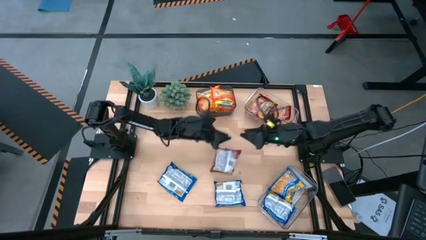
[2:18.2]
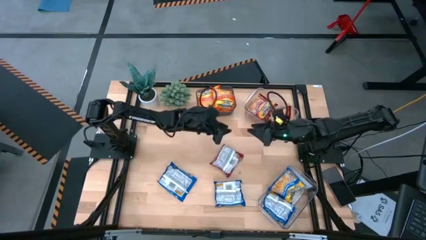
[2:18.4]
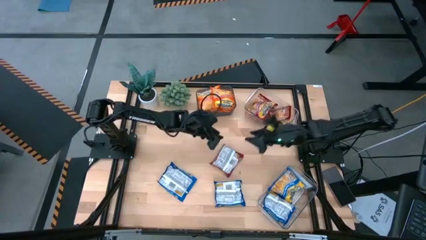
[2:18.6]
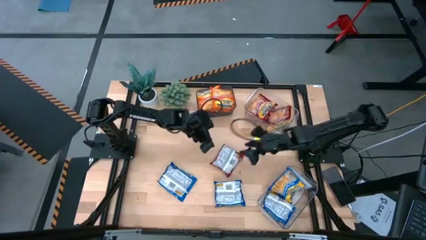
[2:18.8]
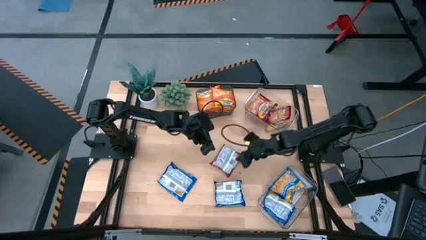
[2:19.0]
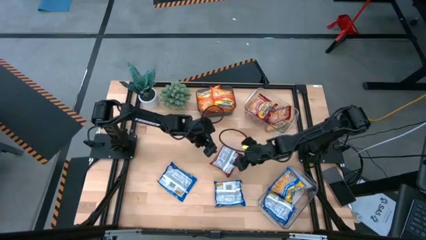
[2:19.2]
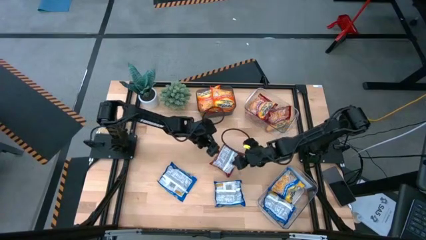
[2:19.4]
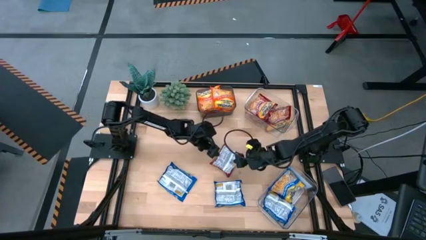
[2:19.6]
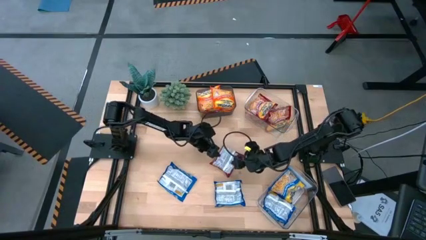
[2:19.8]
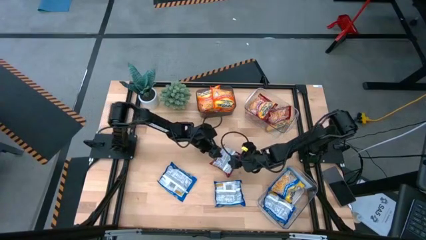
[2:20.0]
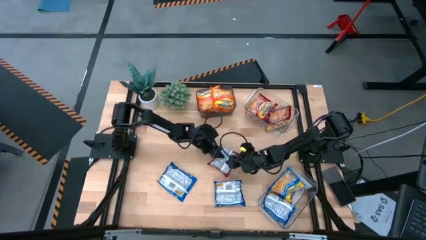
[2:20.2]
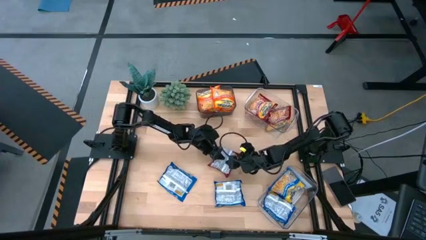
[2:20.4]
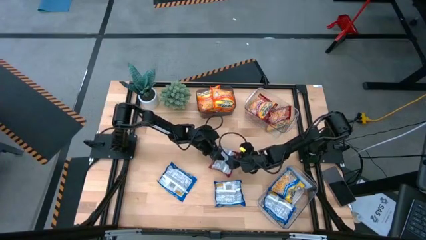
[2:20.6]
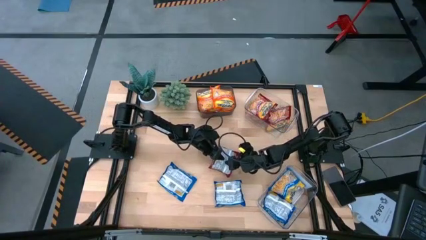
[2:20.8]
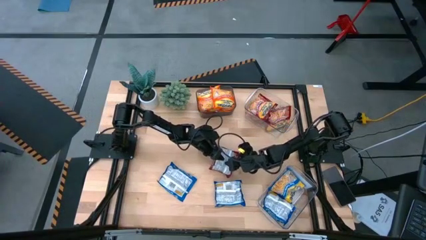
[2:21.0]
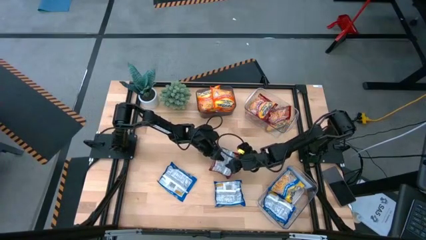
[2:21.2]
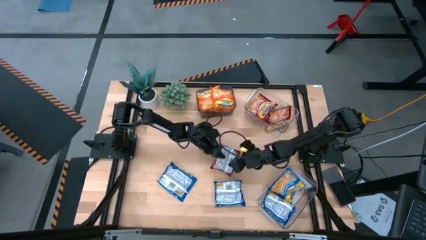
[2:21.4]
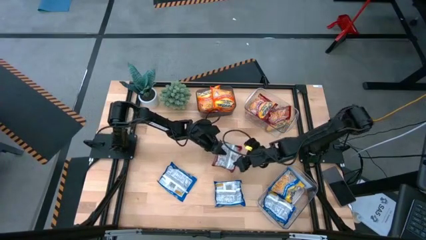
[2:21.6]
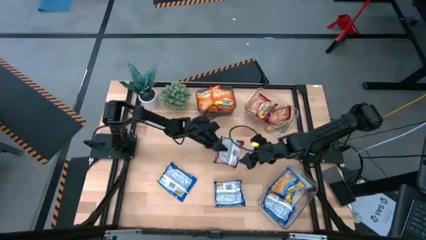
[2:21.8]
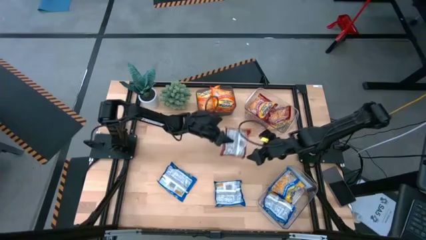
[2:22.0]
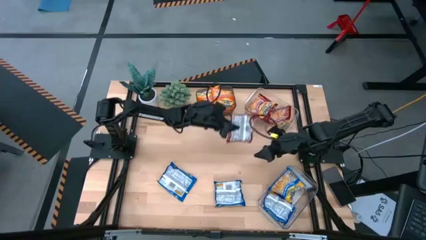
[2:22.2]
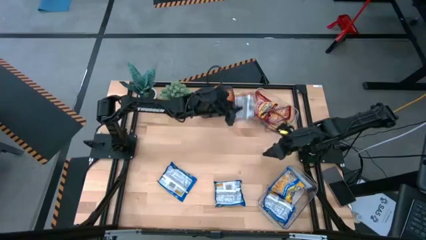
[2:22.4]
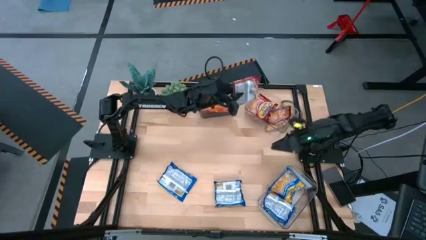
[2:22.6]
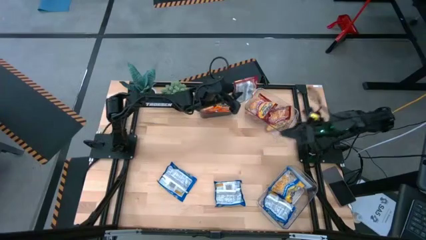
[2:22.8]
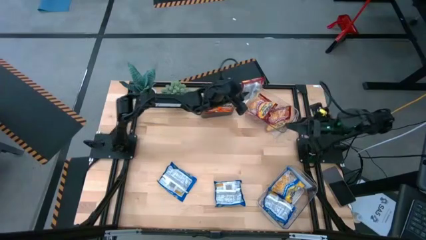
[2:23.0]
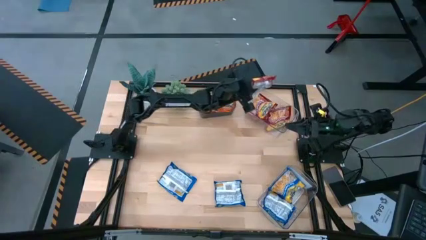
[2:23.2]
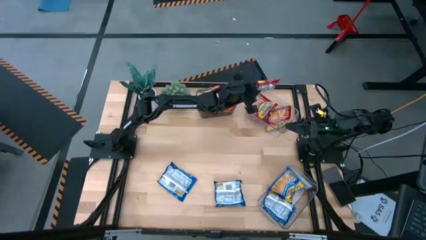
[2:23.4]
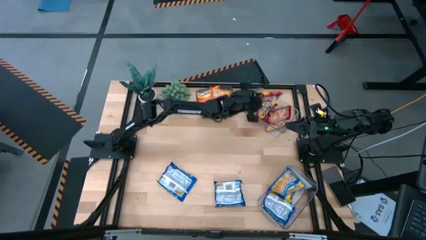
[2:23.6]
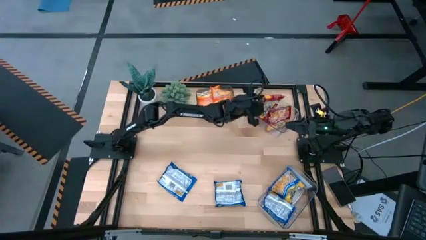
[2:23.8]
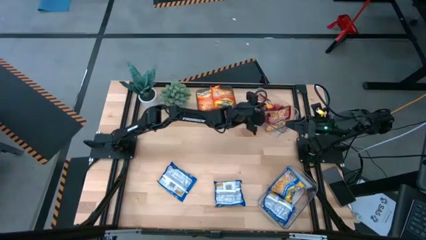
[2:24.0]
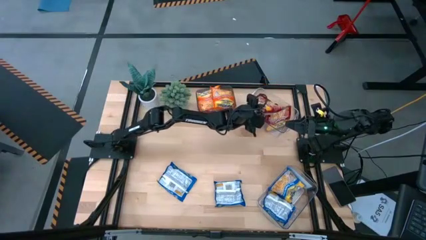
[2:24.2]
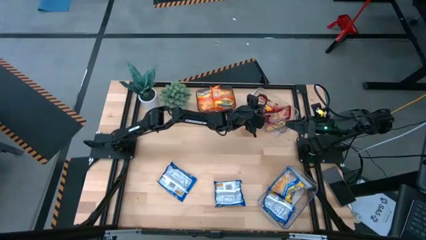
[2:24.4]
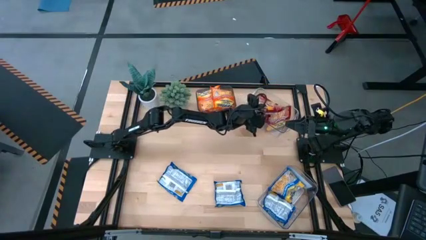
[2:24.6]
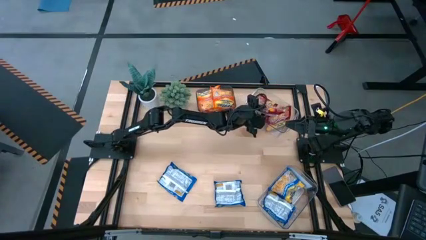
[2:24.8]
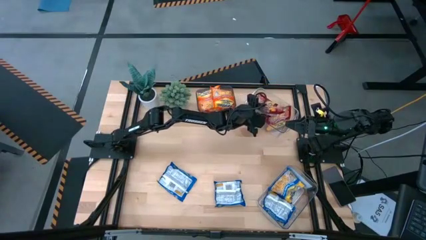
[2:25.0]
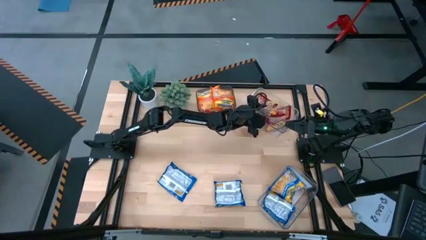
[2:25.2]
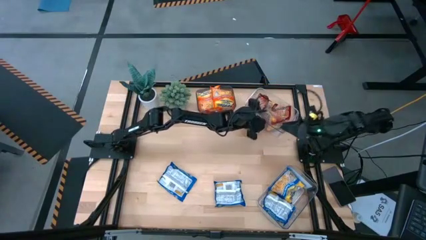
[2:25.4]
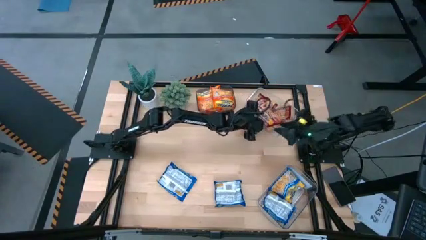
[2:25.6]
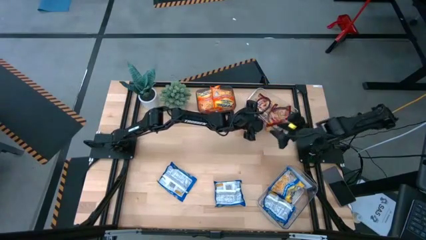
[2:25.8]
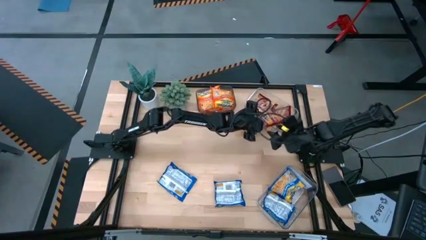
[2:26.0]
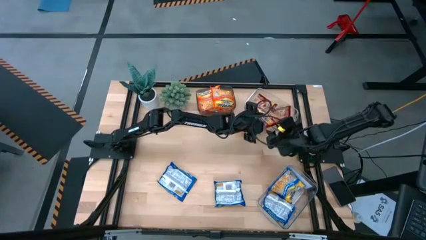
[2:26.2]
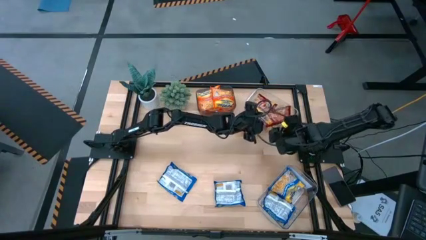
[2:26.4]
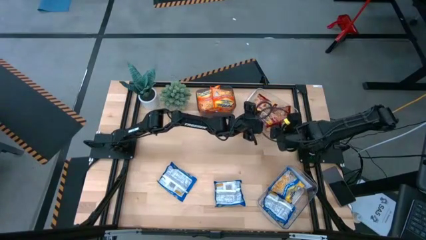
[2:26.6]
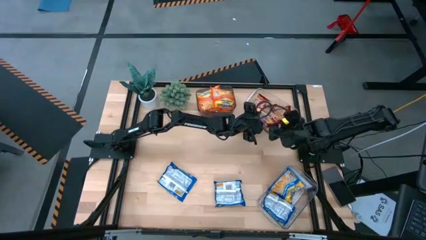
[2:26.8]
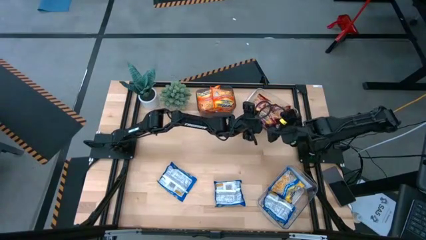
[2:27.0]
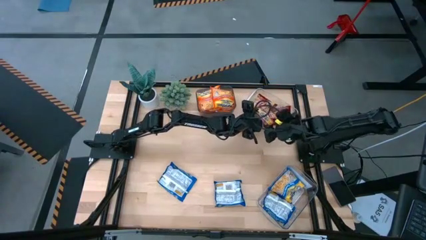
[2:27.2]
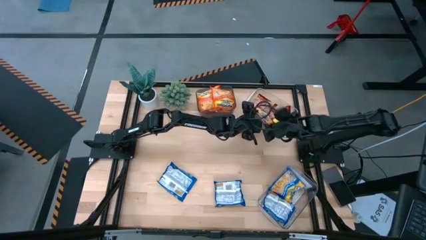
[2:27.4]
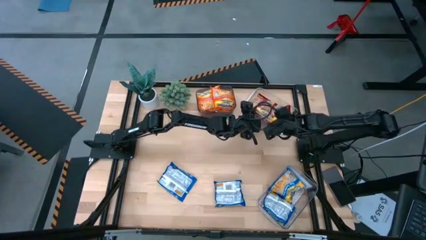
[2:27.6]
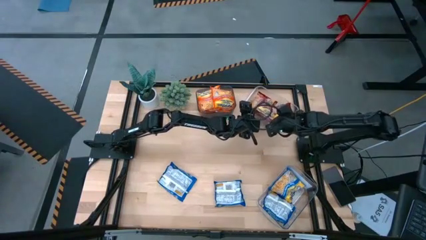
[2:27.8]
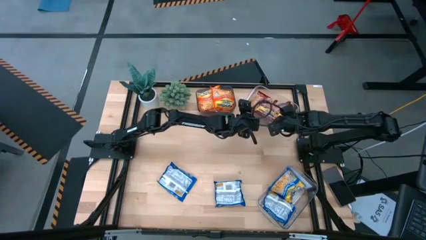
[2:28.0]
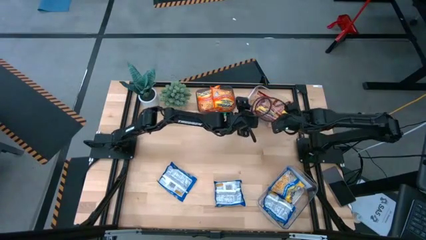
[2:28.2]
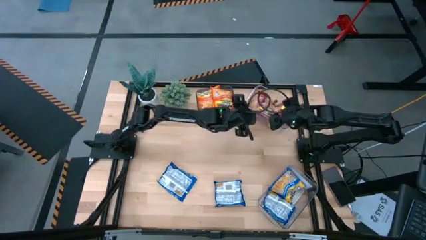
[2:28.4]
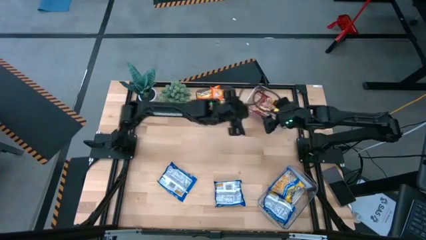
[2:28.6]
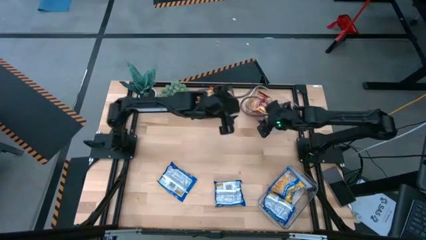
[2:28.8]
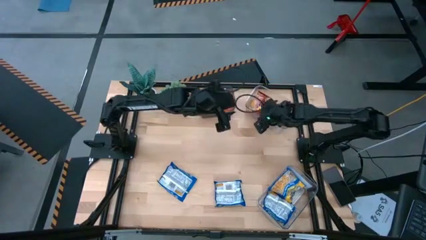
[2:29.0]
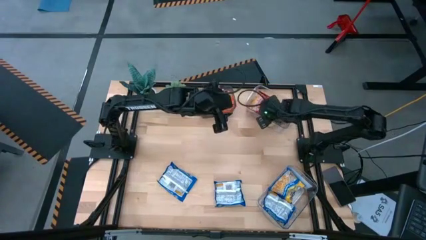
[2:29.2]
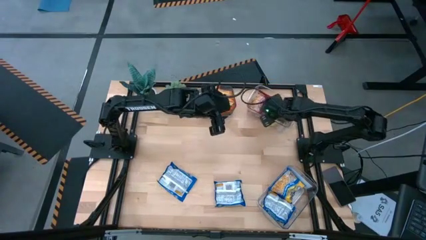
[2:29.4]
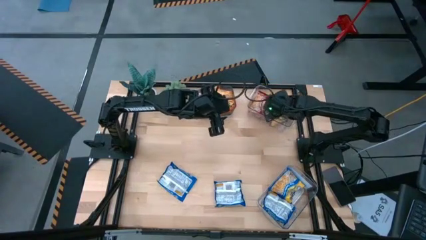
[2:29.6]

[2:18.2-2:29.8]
Task: Sort Maruchan noodles
Put the red noodle pack into the top transparent bin

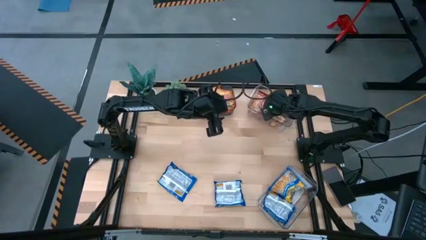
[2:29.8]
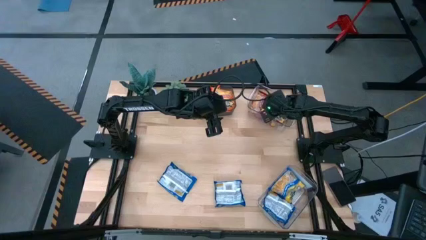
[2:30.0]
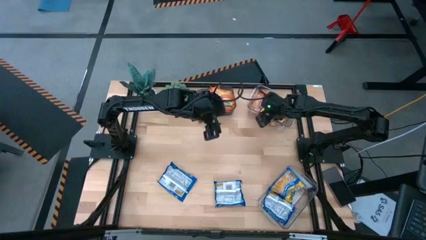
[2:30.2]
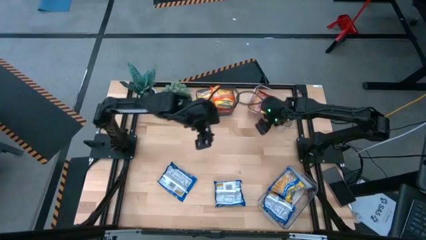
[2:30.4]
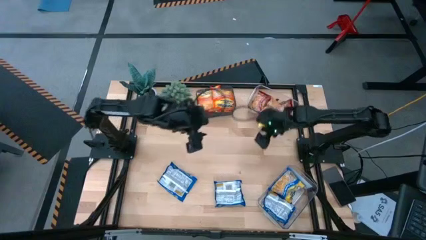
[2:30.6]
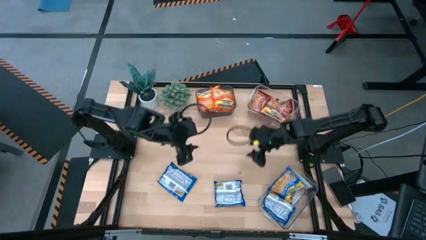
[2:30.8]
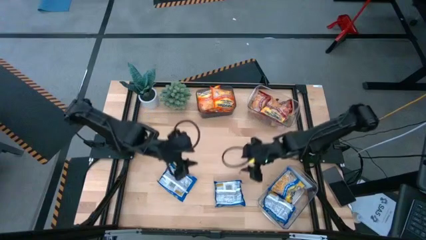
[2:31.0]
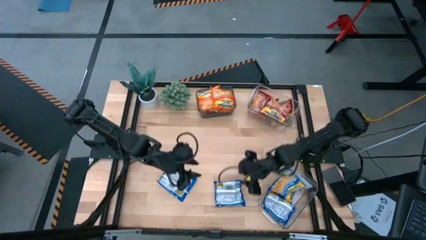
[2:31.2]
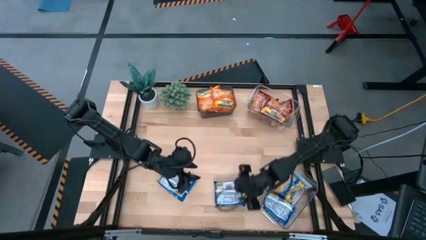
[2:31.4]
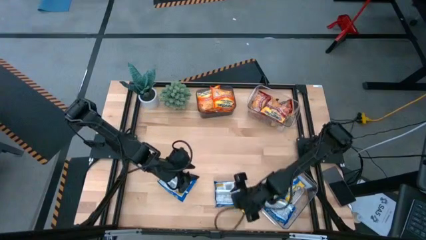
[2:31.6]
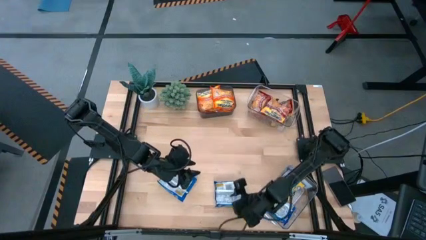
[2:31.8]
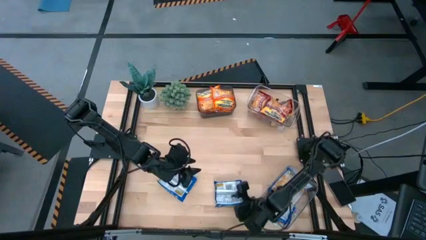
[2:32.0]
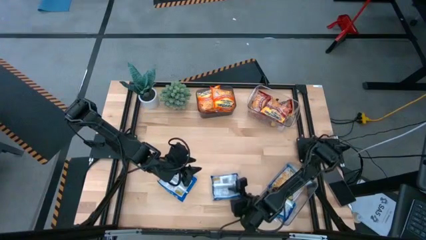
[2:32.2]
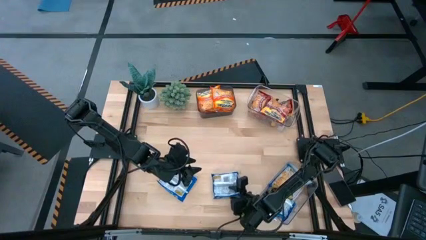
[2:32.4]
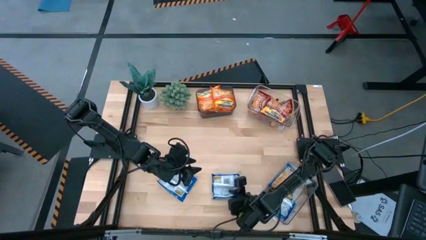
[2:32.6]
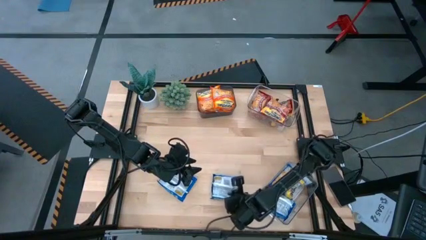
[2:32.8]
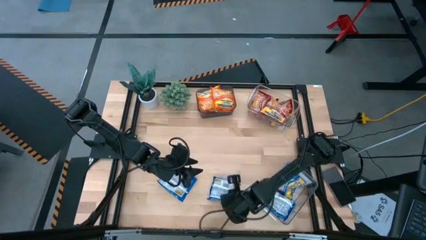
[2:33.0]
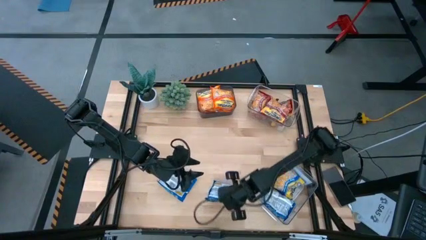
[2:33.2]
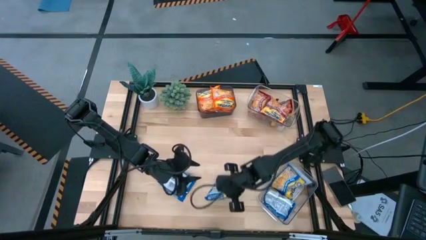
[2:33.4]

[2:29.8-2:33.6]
Put the blue noodle pack into the bottom transparent bin
